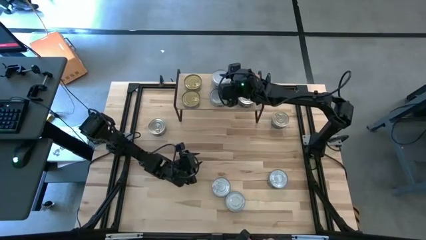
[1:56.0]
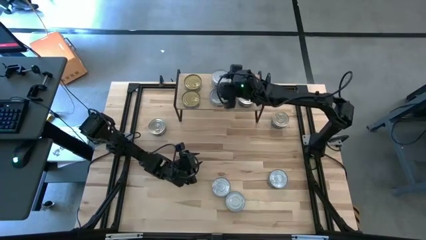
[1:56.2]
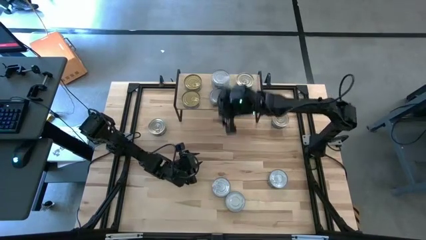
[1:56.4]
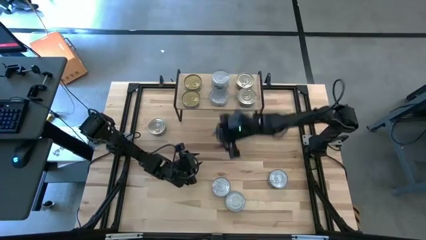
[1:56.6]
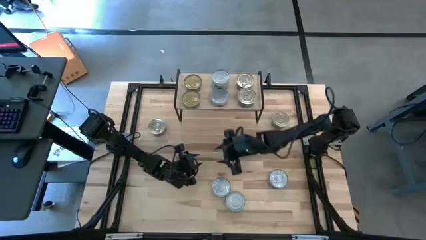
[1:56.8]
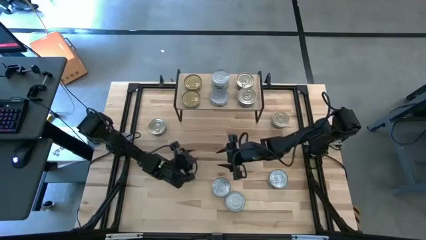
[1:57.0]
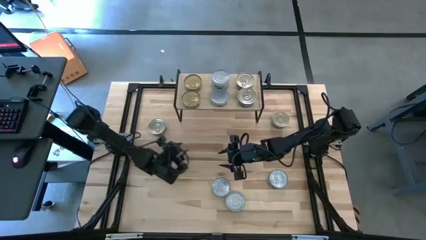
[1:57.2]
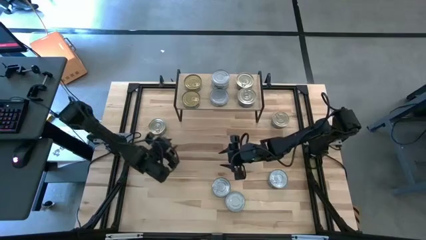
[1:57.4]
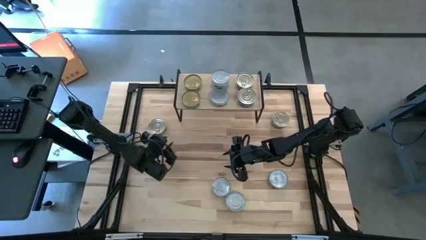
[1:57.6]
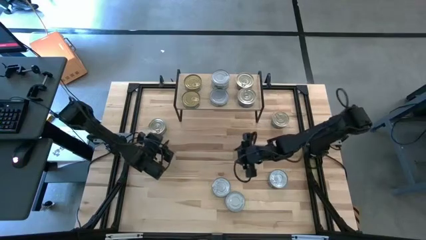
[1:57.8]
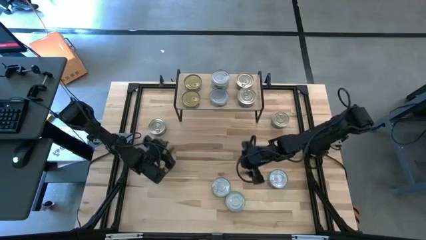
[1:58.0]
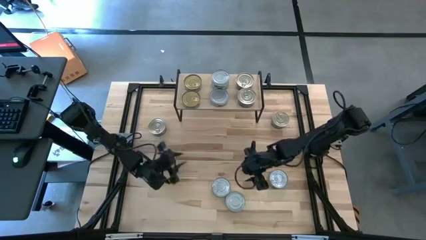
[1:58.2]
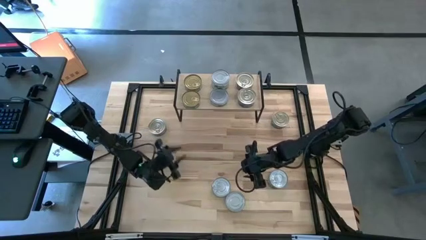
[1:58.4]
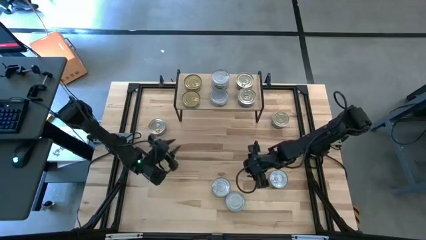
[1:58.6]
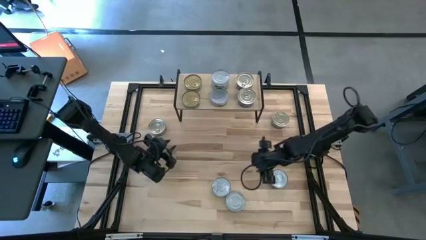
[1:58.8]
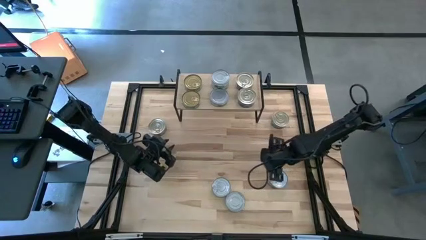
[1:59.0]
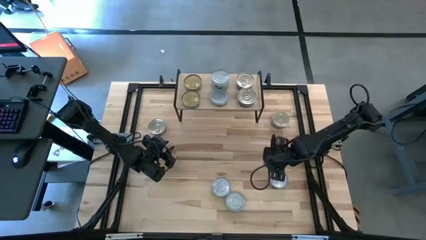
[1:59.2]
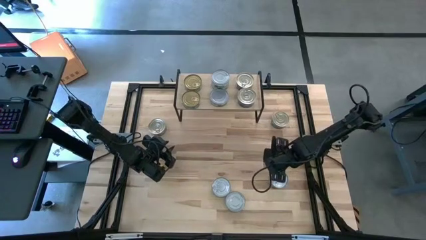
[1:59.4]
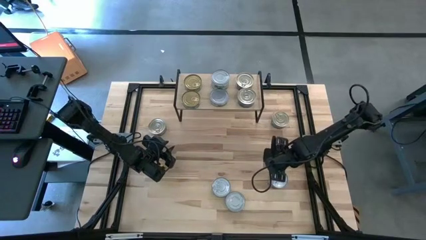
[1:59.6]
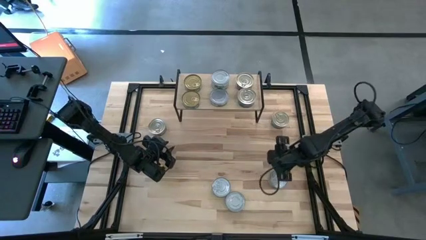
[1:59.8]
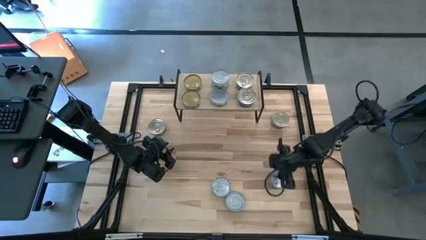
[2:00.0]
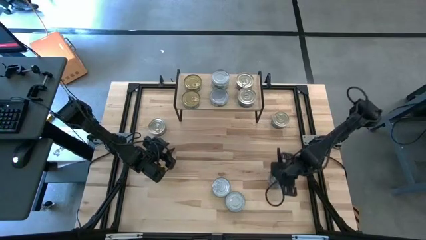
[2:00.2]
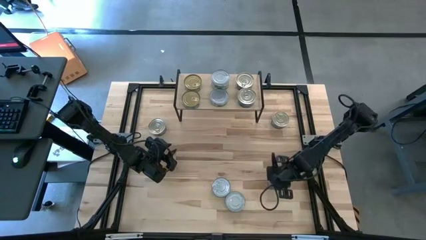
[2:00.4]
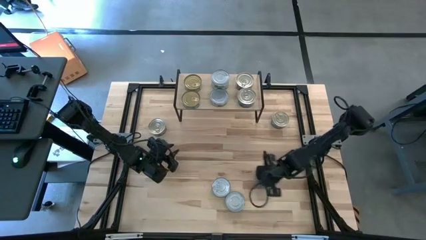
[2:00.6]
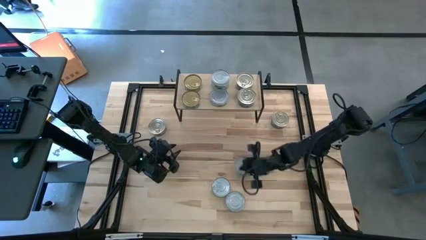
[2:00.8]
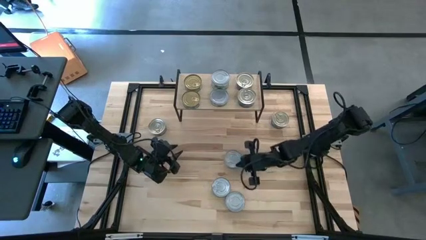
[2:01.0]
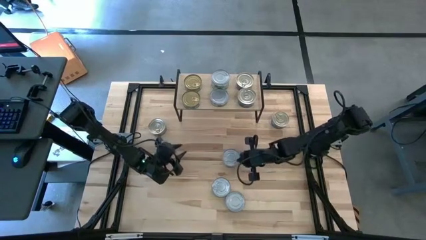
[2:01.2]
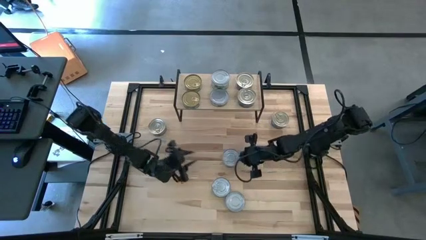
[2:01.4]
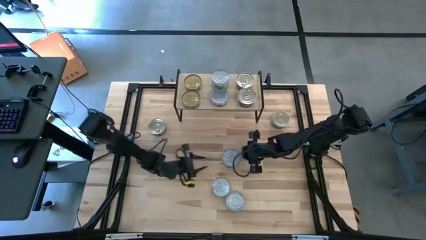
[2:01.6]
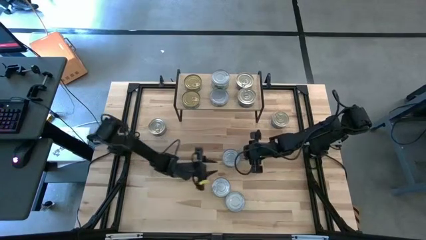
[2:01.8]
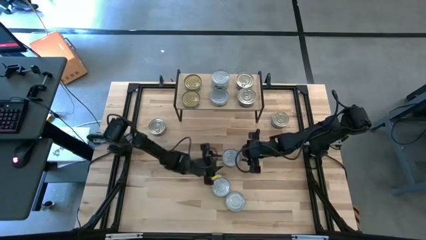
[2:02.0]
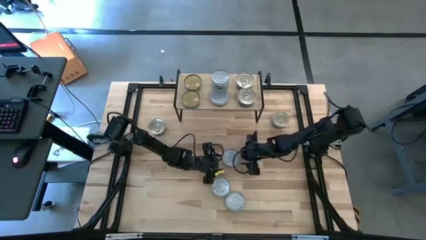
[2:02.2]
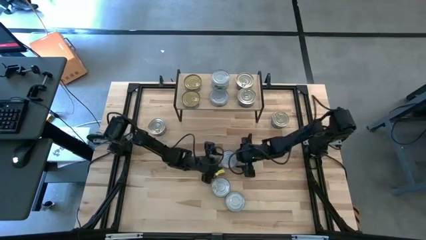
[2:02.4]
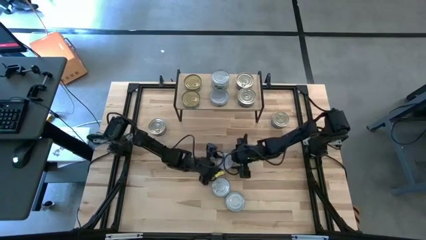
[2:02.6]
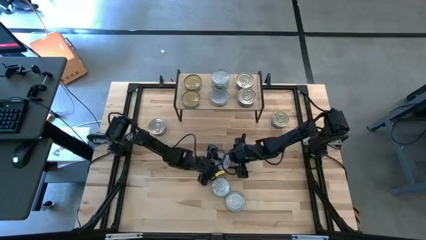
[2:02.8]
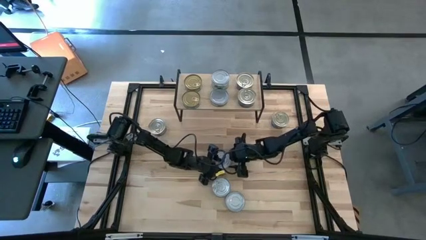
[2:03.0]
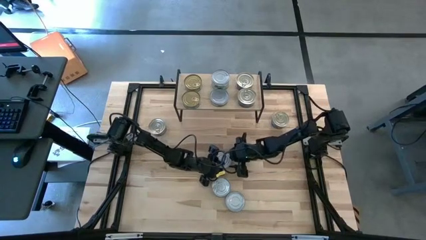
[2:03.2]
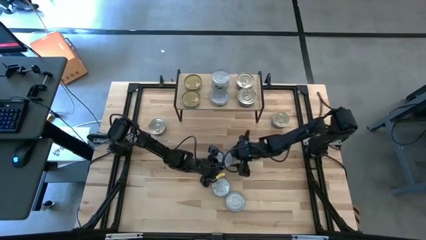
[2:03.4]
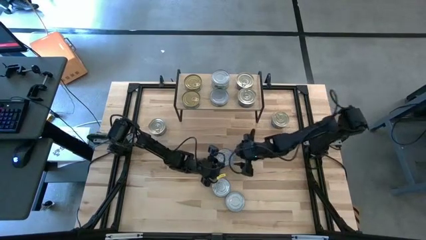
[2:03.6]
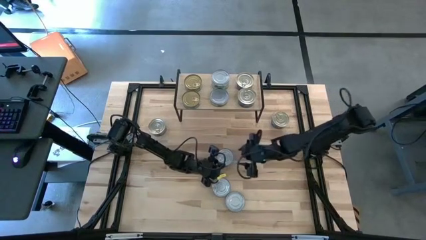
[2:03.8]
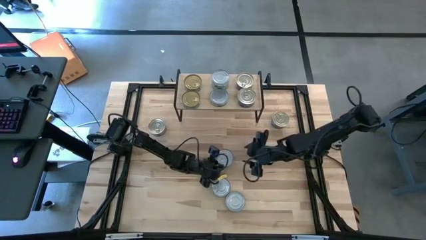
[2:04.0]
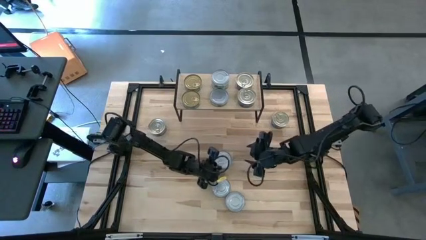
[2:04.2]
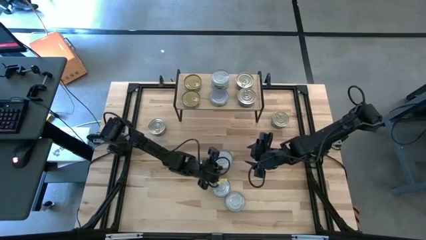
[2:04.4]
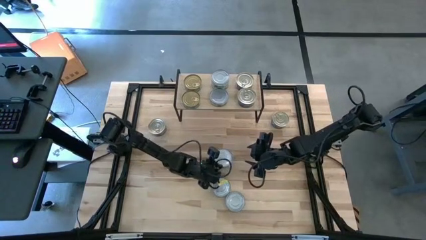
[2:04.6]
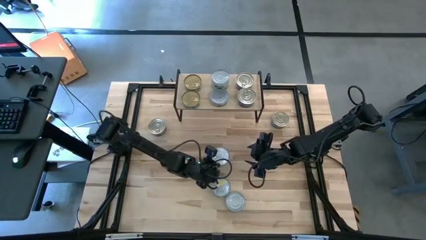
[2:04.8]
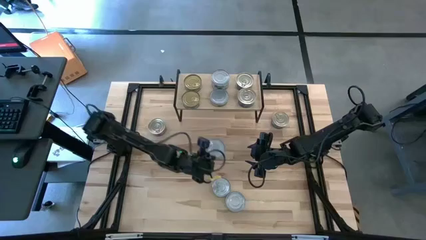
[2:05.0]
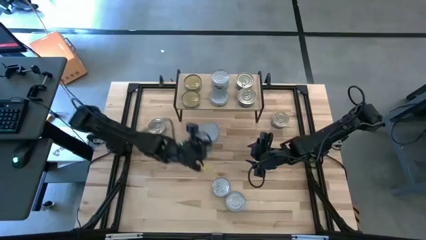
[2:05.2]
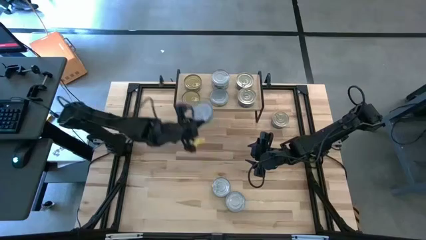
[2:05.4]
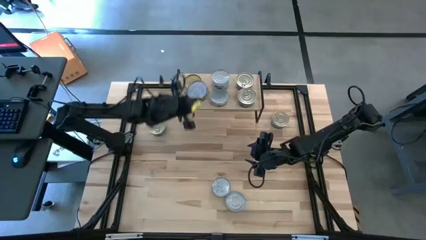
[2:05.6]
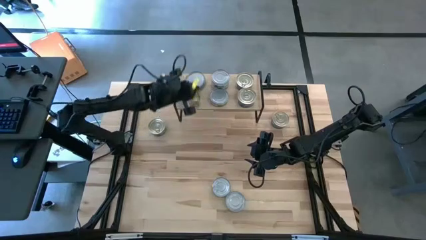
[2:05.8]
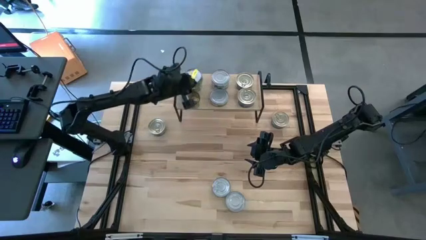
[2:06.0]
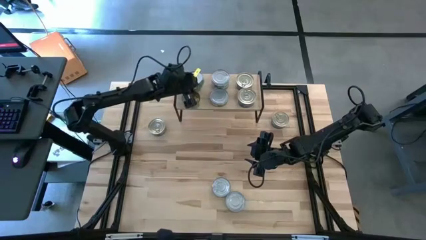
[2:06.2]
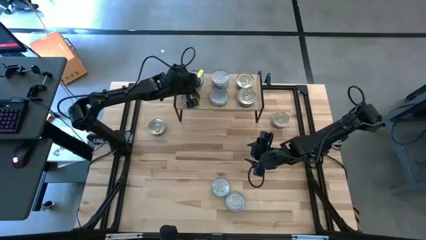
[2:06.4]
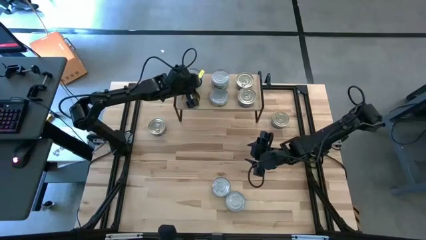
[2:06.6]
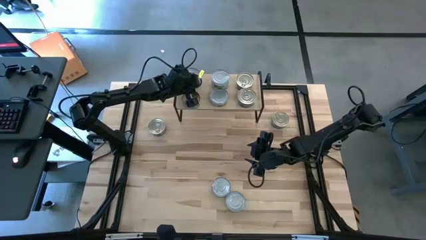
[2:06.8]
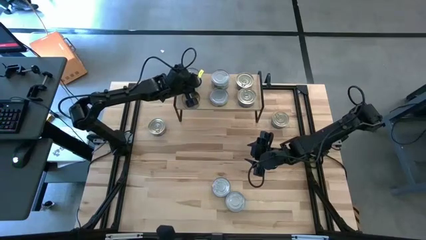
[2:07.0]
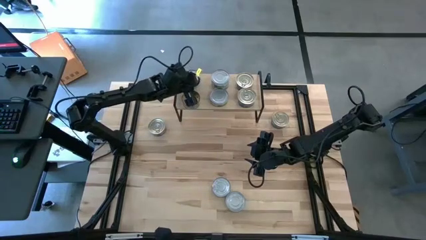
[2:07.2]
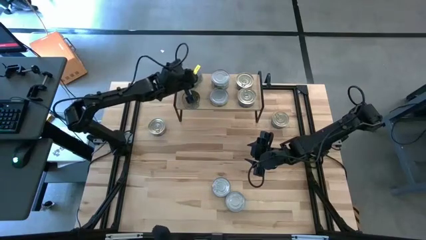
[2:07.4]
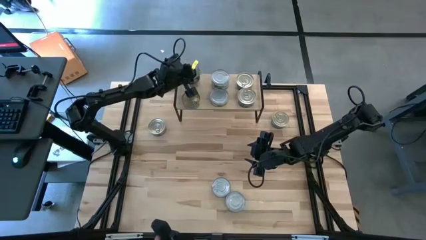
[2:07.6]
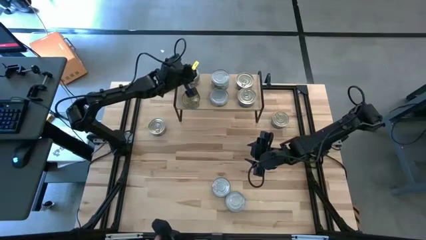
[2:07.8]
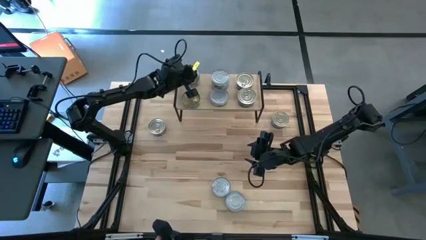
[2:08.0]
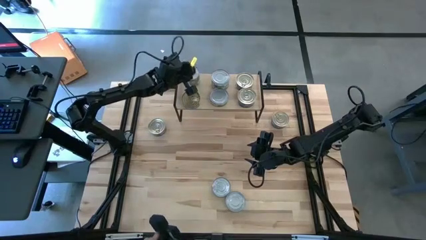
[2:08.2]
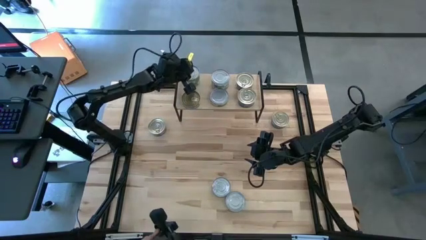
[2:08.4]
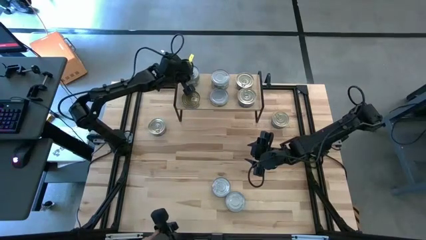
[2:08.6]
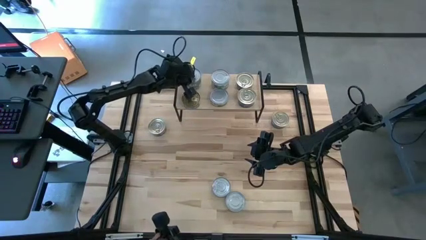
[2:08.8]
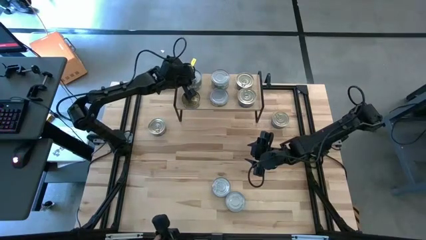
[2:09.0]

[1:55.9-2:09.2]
Task: Stack canned seafood by type on shelf
Stack the right green tuna can on top of the top green tuna can on the shelf

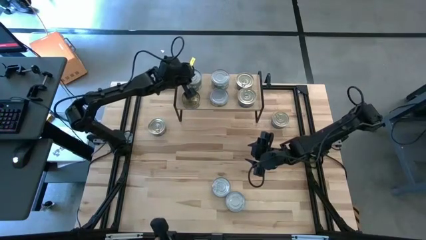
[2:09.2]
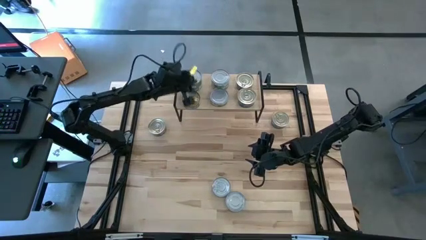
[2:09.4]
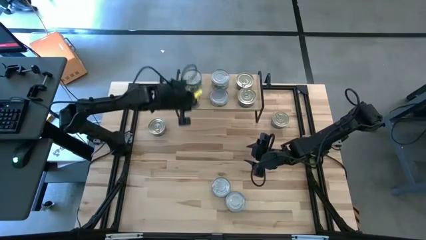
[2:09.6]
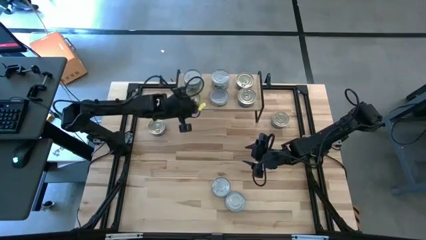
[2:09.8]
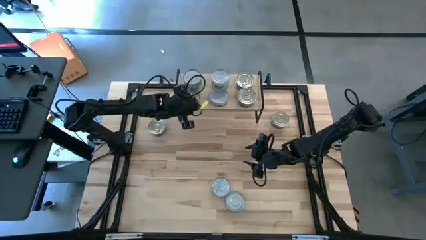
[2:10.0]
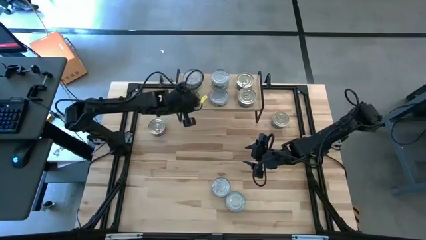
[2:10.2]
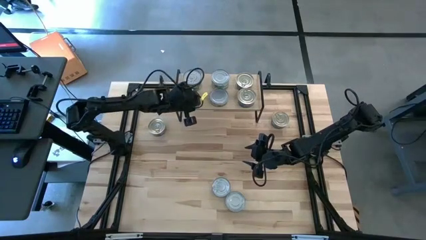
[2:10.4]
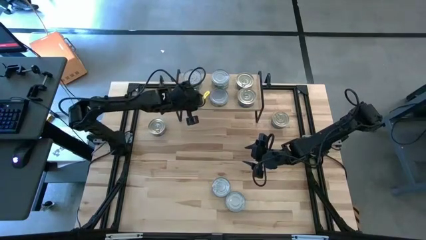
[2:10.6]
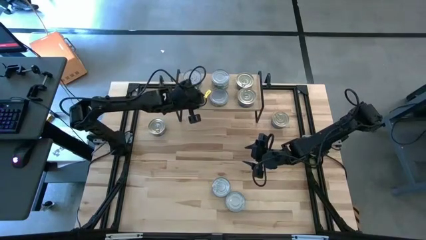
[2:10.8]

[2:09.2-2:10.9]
Adjust the bottom green tuna can on the shelf
